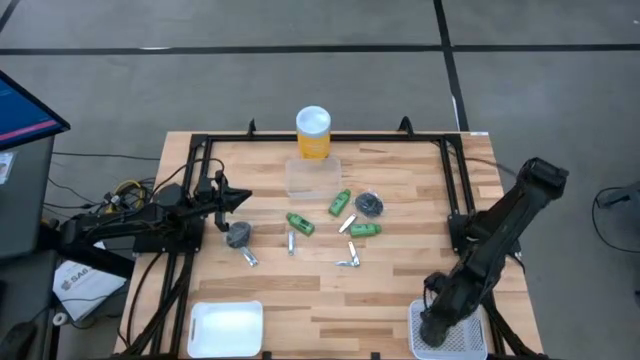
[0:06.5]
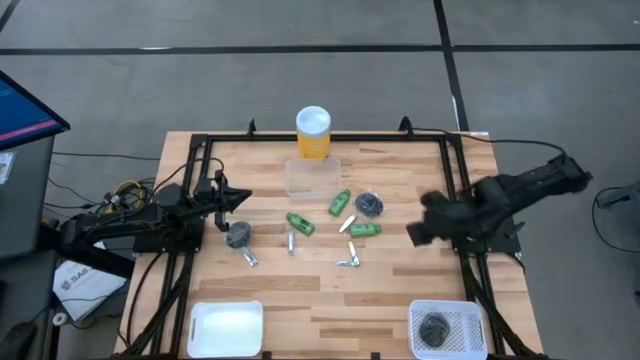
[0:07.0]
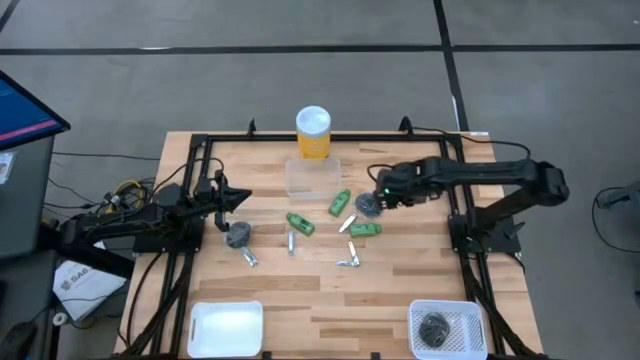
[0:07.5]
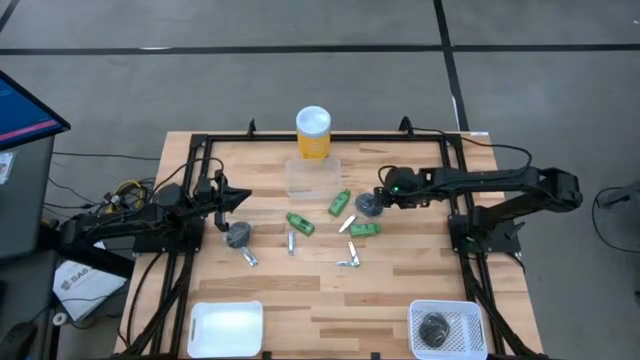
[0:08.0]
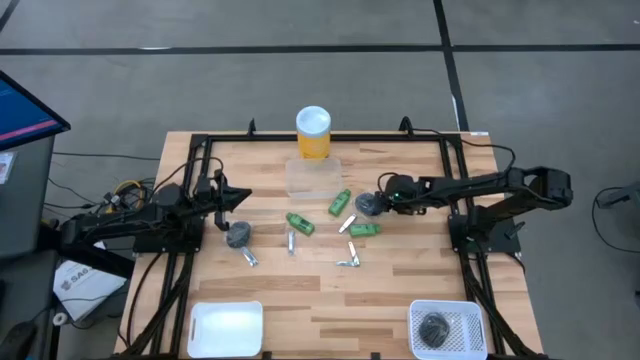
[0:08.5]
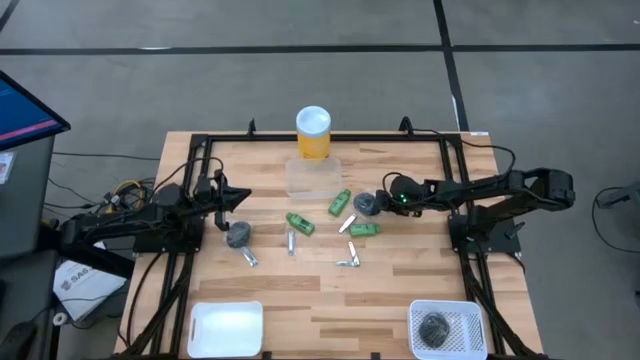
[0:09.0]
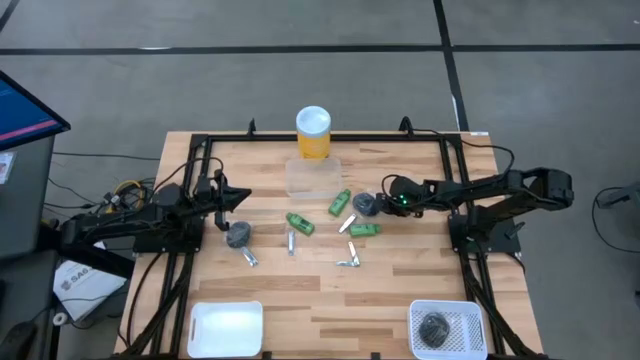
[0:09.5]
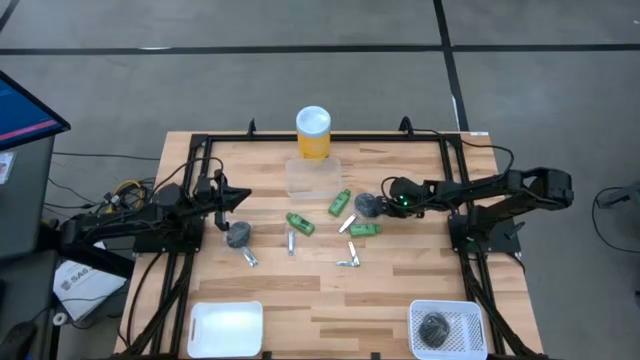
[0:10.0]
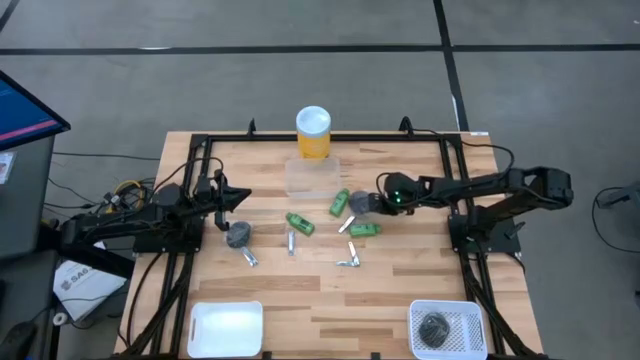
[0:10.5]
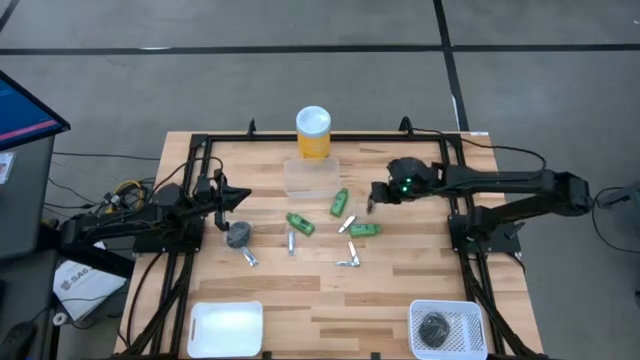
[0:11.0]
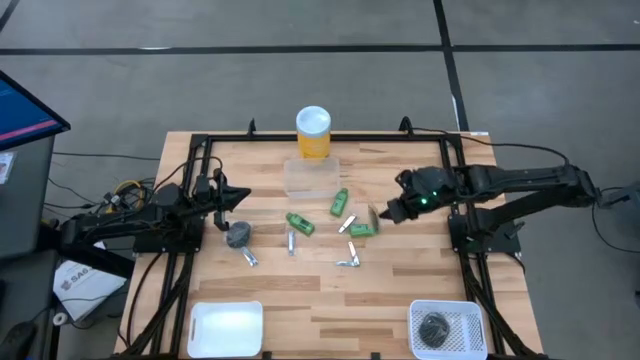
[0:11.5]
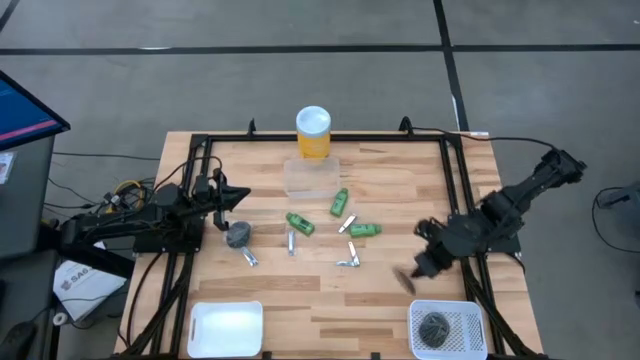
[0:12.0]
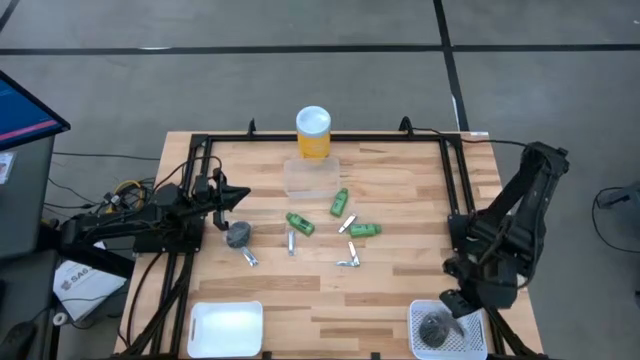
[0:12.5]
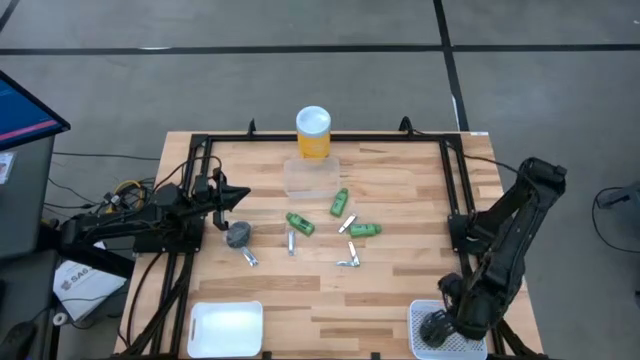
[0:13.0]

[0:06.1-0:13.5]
Task: Pick & Place Travel size toiletries
Put the top black hairbrush into the right white bin

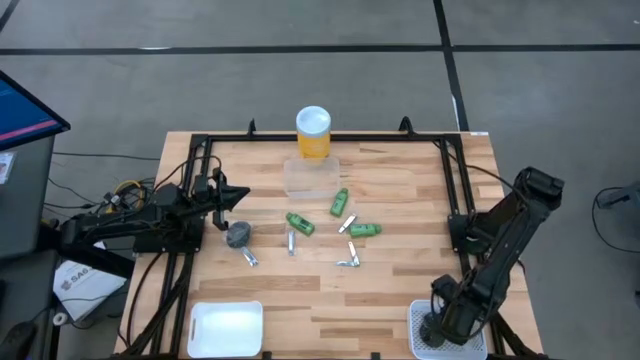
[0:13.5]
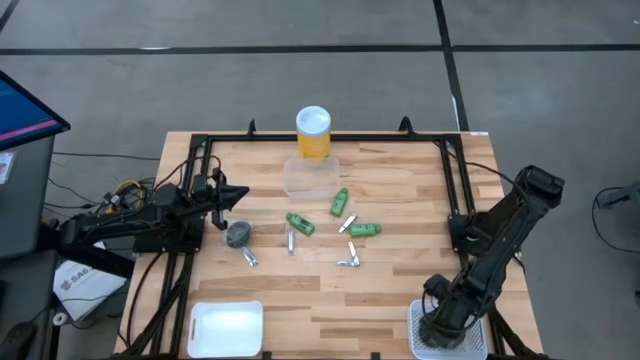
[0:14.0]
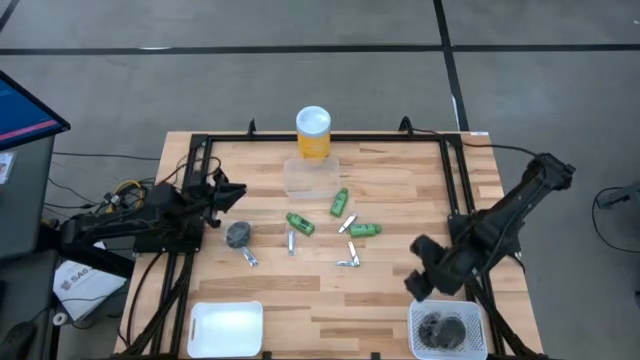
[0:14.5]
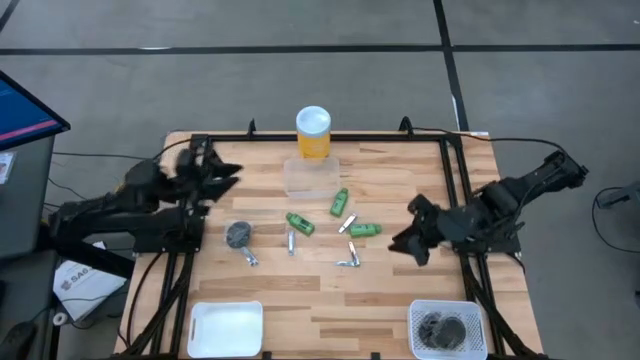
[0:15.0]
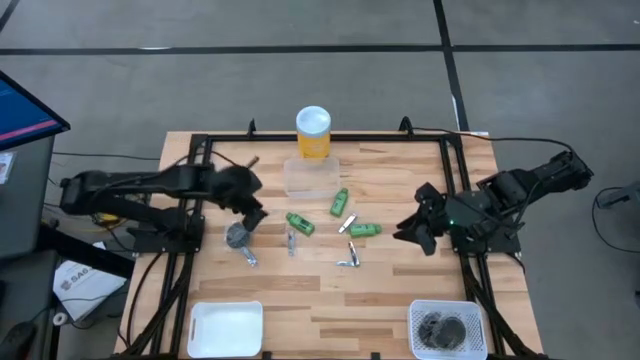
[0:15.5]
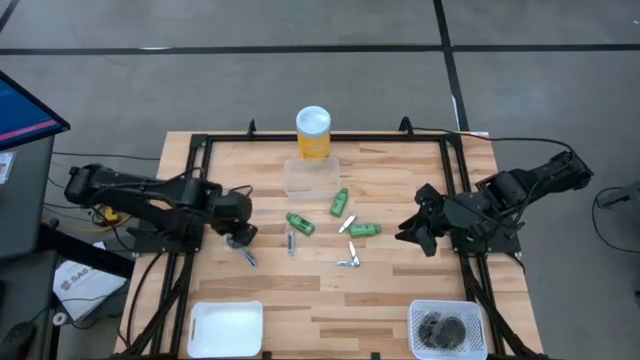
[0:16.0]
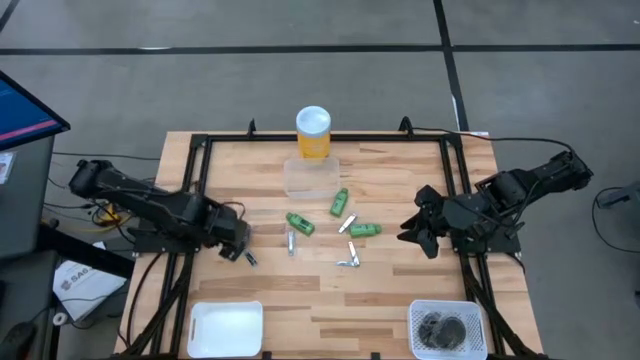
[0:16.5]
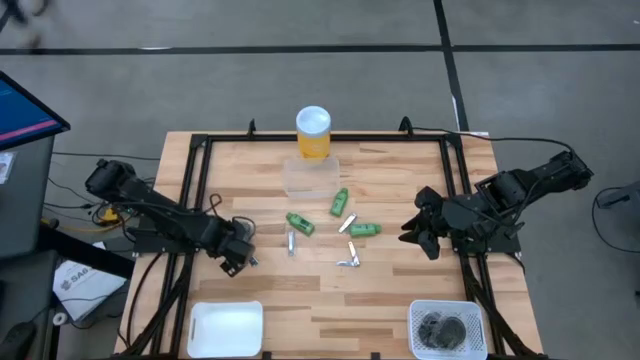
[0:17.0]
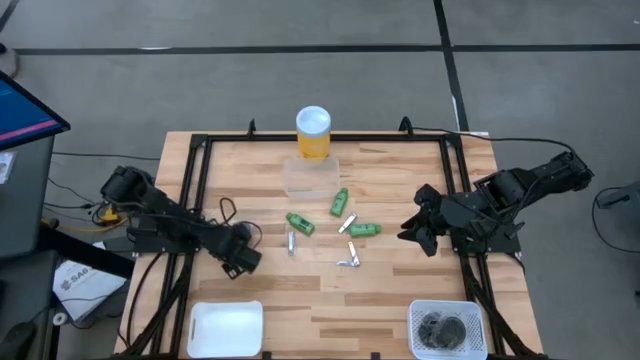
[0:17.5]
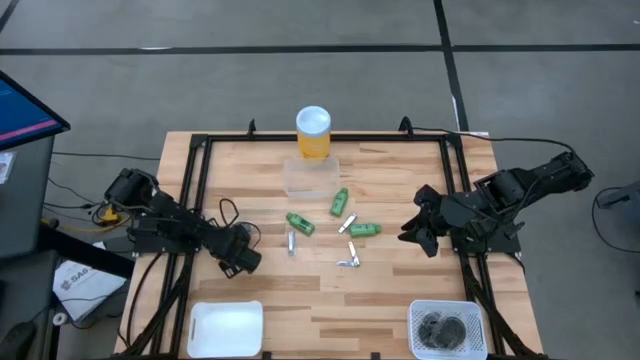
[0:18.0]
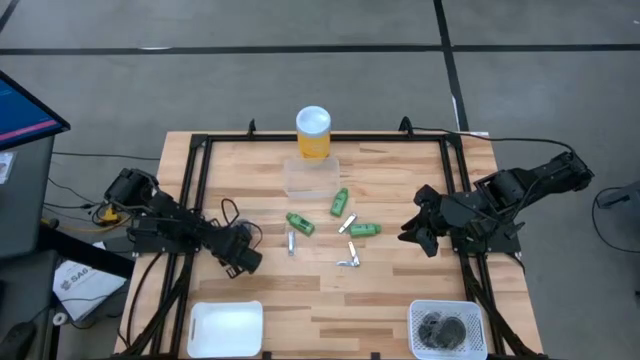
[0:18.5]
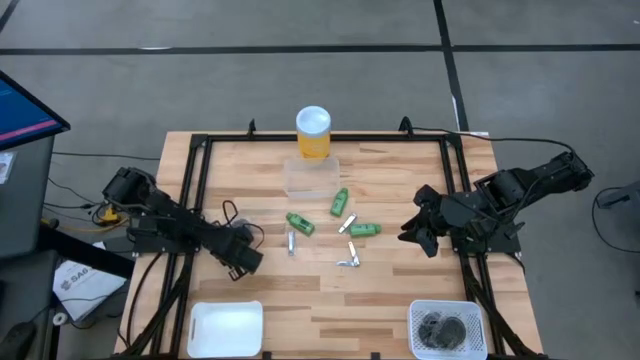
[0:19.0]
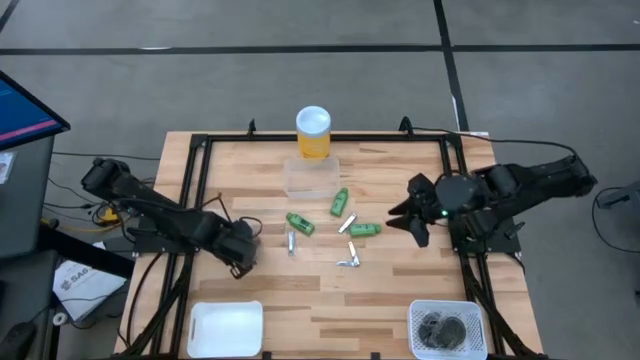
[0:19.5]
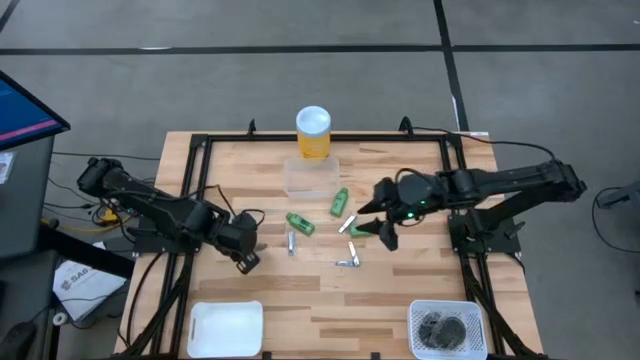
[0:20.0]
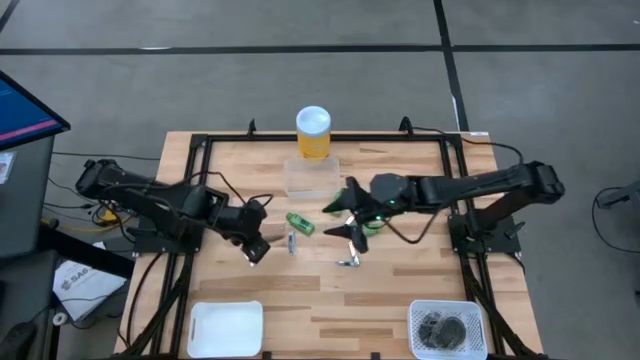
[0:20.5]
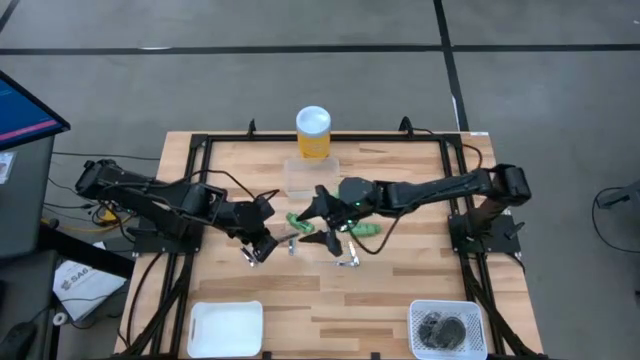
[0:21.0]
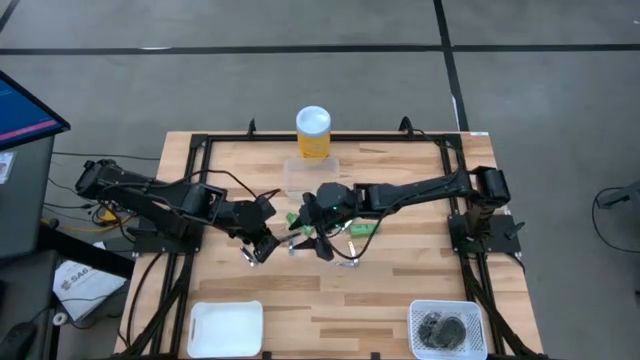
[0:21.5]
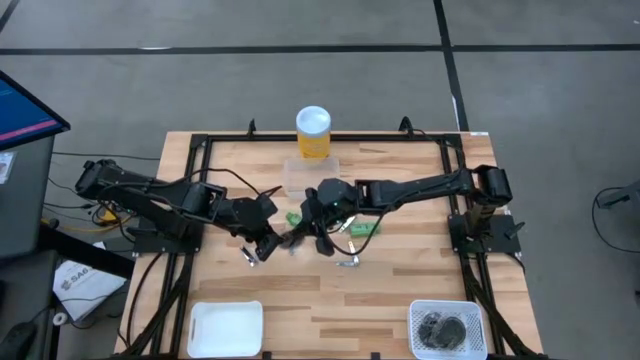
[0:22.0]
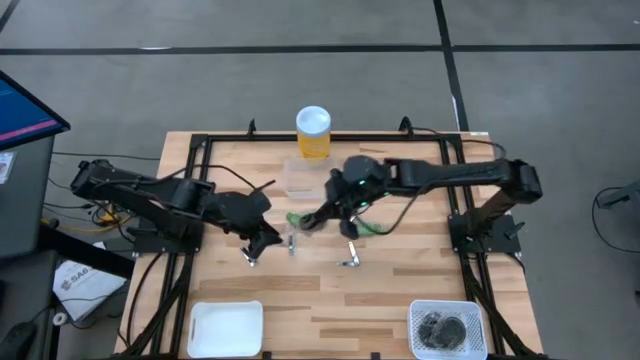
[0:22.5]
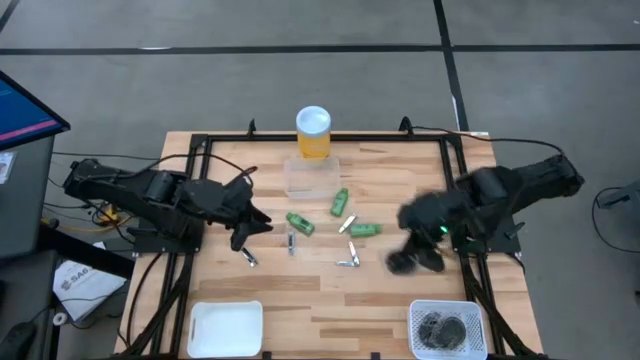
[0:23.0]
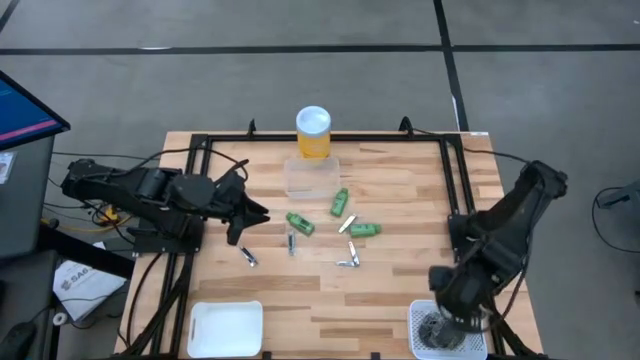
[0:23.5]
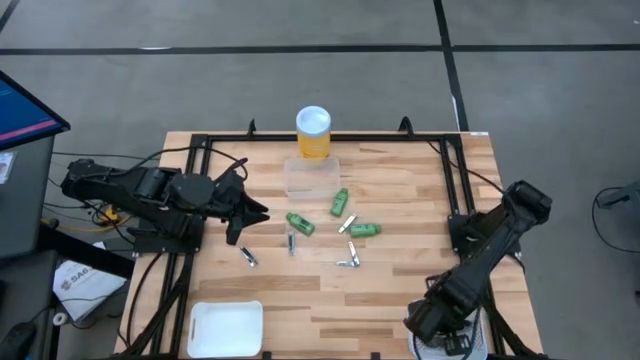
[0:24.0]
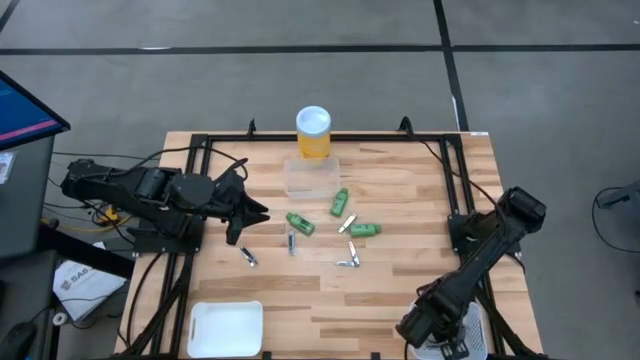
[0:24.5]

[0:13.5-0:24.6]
Put the black hairbrush into the right white bin

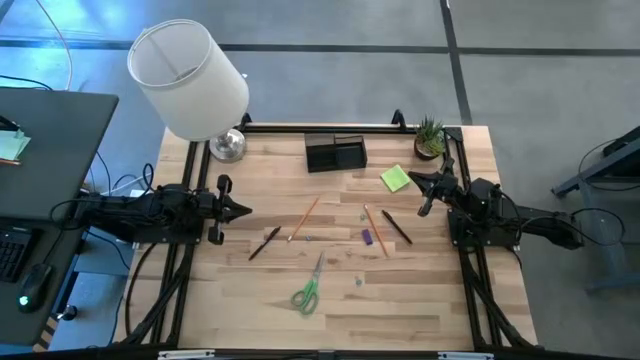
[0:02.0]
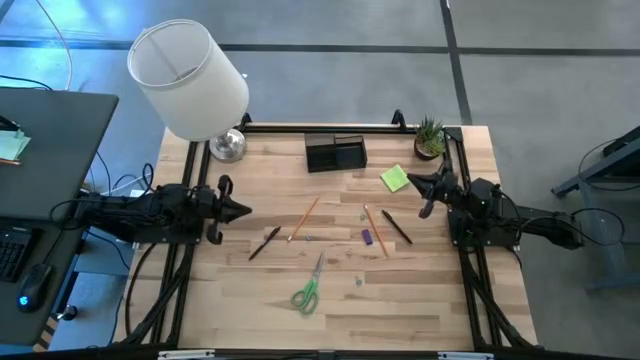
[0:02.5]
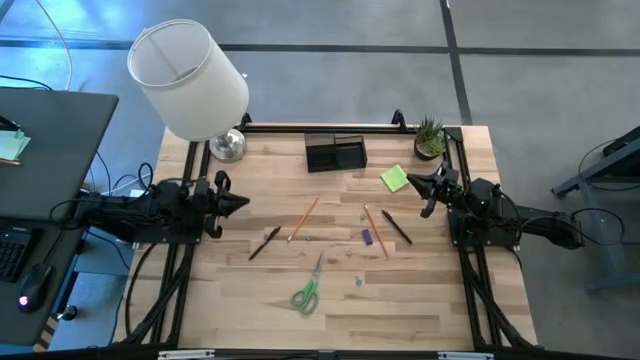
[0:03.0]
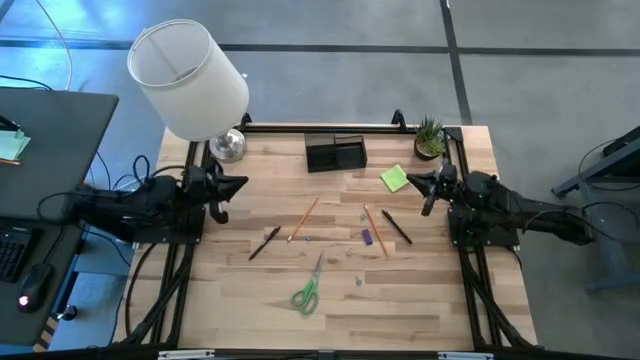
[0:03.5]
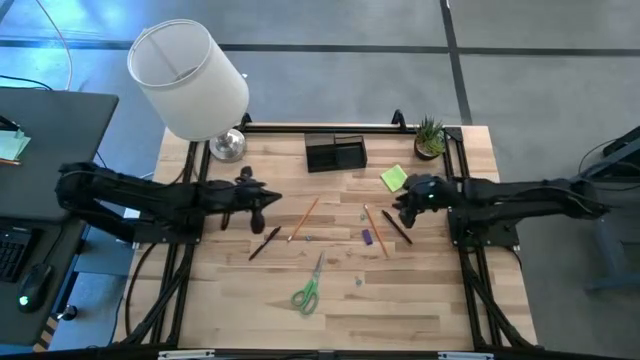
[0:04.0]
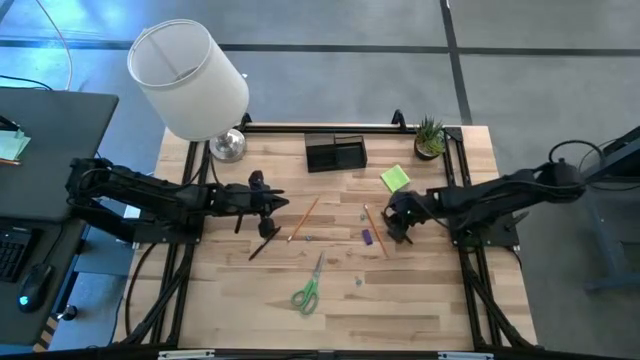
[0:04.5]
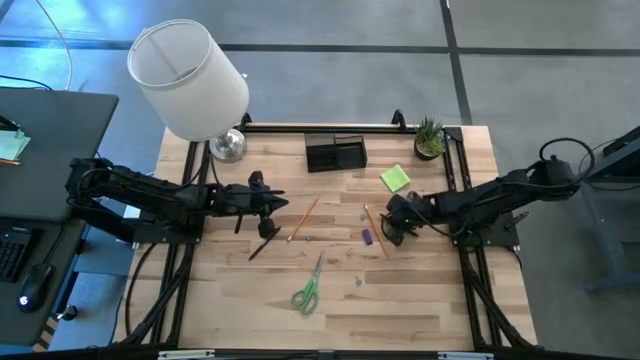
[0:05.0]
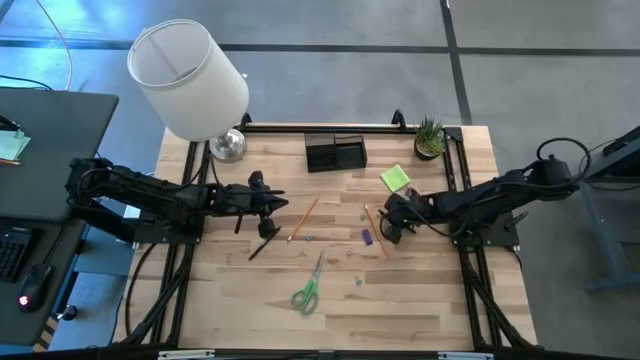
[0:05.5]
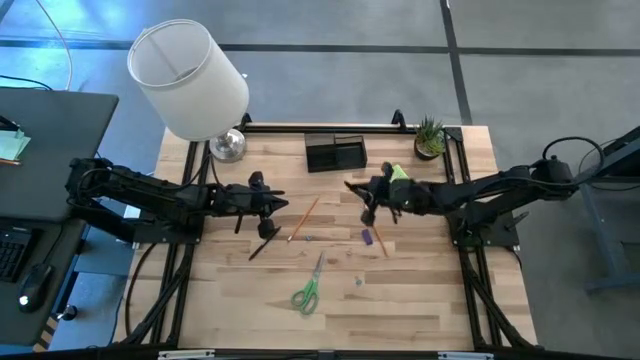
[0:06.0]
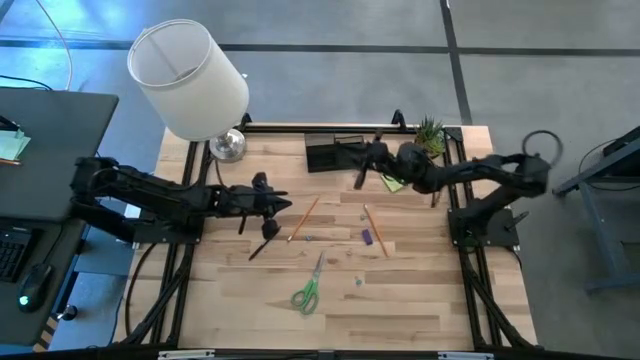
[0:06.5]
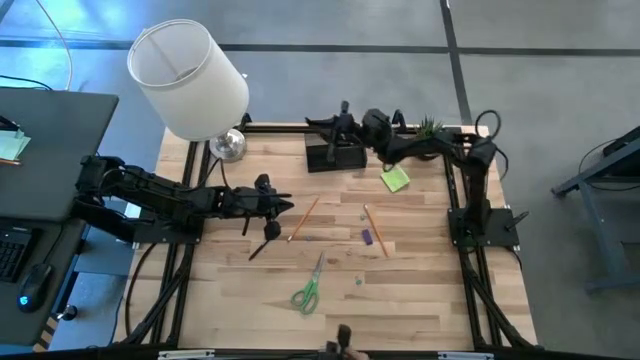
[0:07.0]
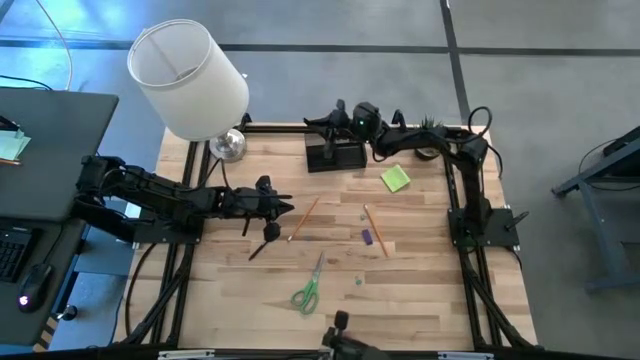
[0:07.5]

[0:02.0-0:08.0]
Task: Pick and place office supplies into organizer
Put the right black desk into the black desk organizer
